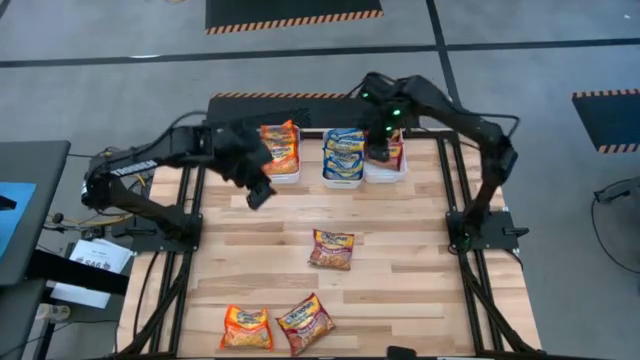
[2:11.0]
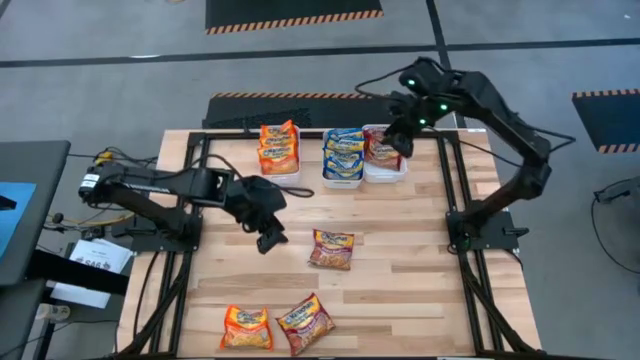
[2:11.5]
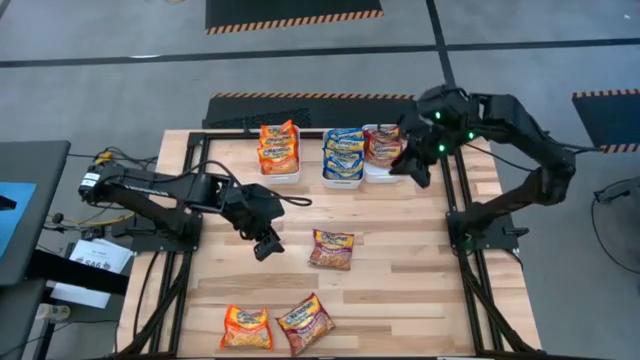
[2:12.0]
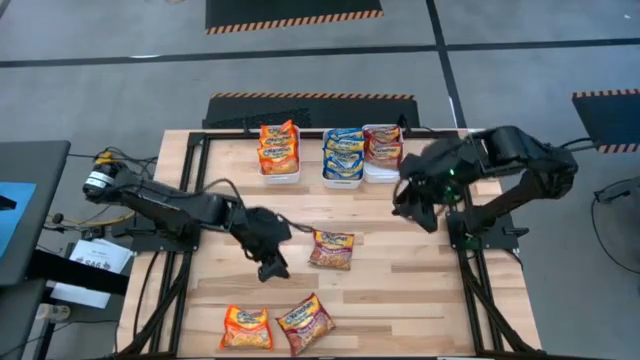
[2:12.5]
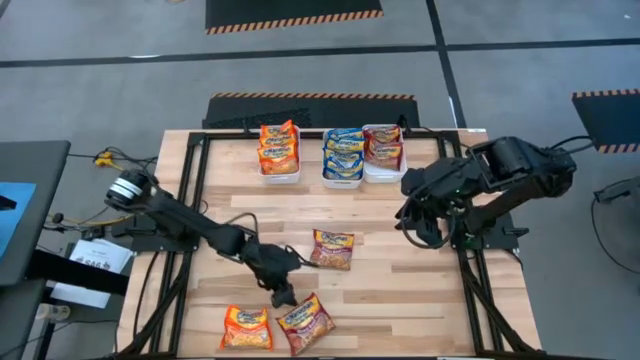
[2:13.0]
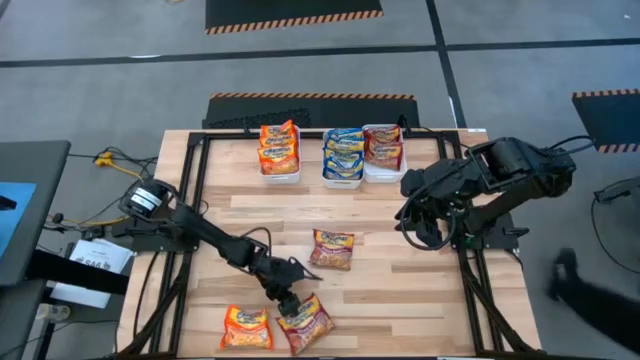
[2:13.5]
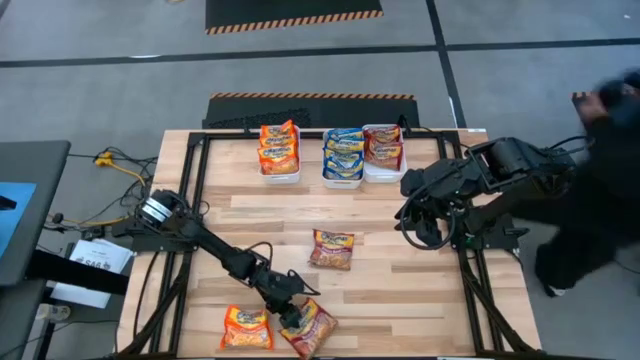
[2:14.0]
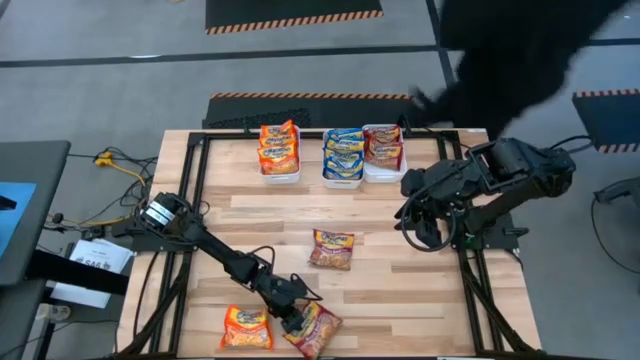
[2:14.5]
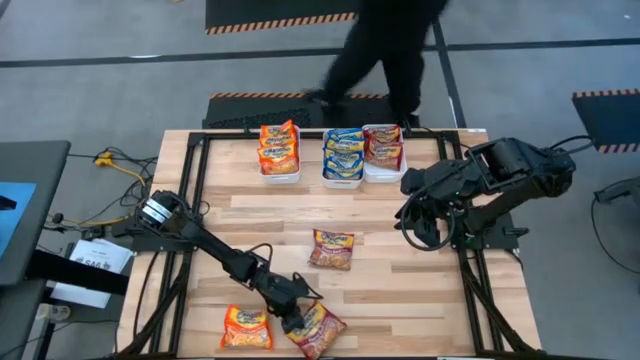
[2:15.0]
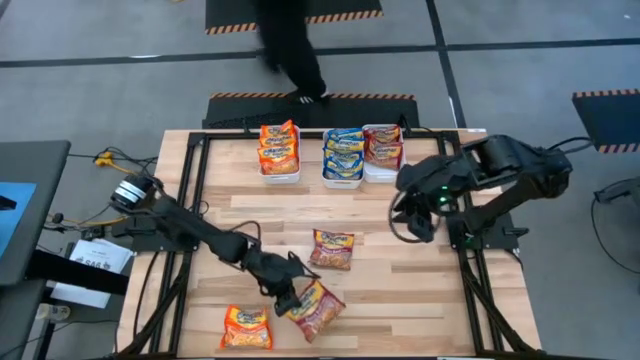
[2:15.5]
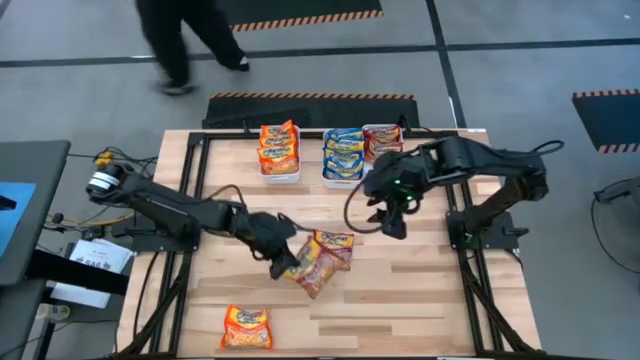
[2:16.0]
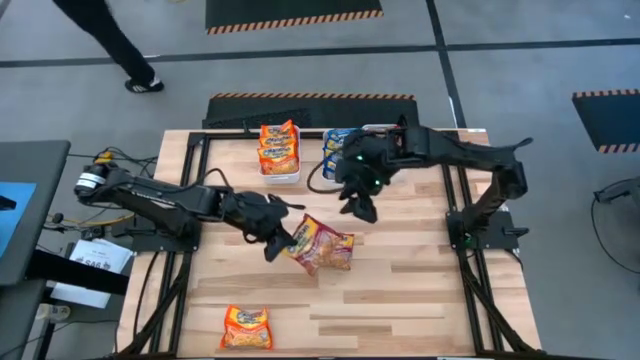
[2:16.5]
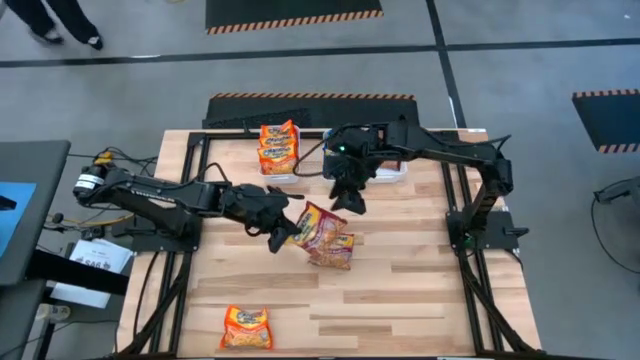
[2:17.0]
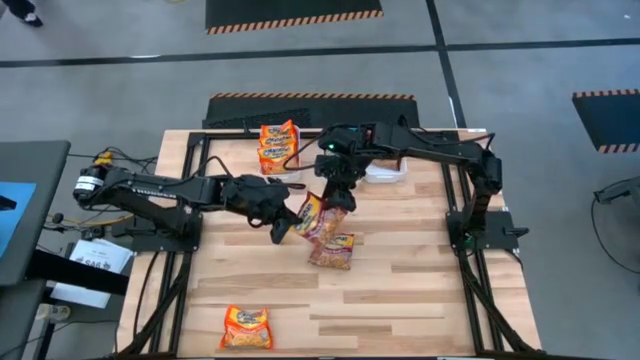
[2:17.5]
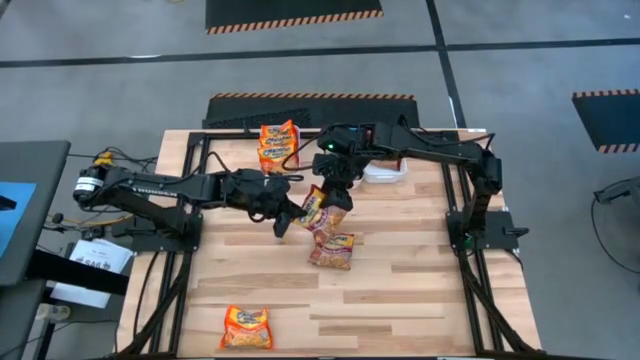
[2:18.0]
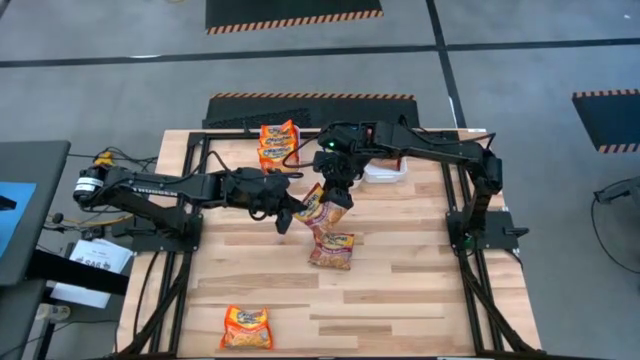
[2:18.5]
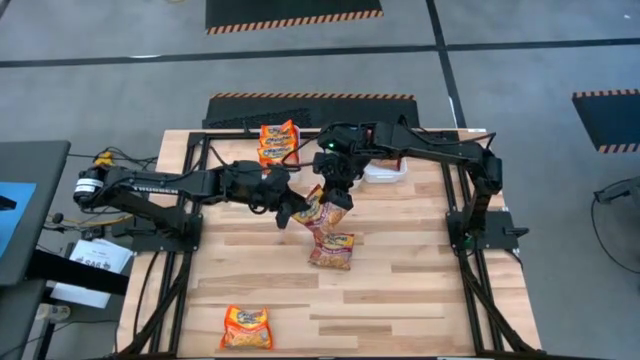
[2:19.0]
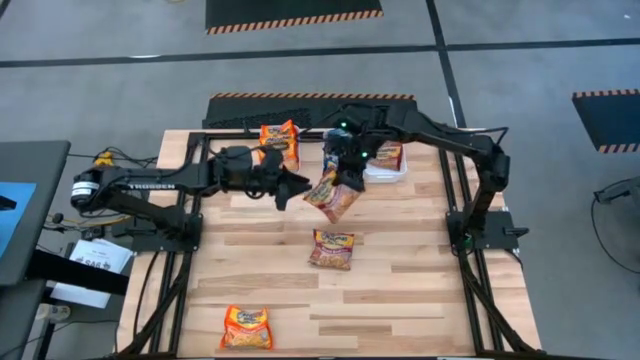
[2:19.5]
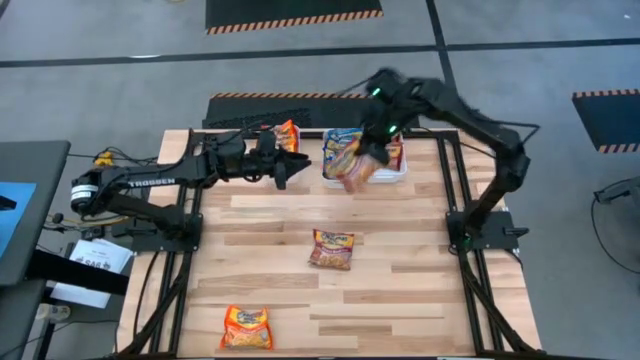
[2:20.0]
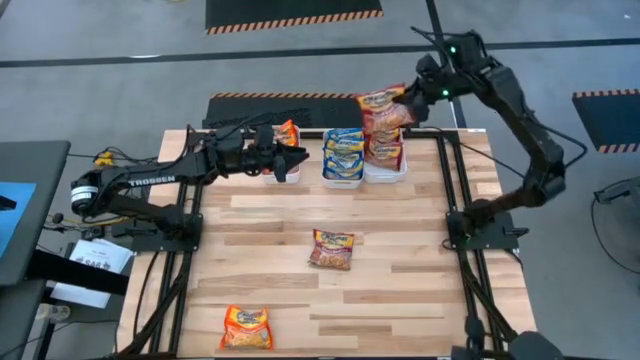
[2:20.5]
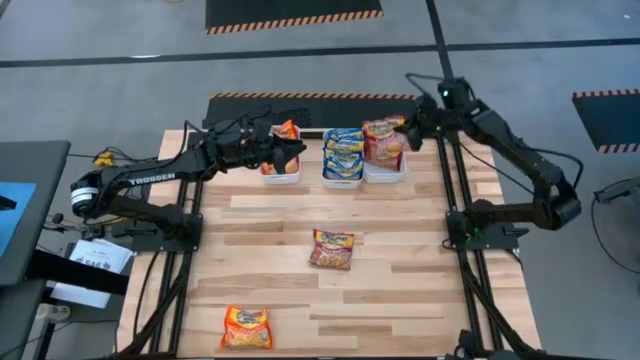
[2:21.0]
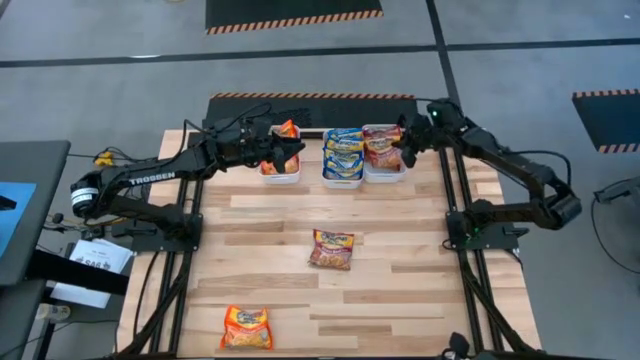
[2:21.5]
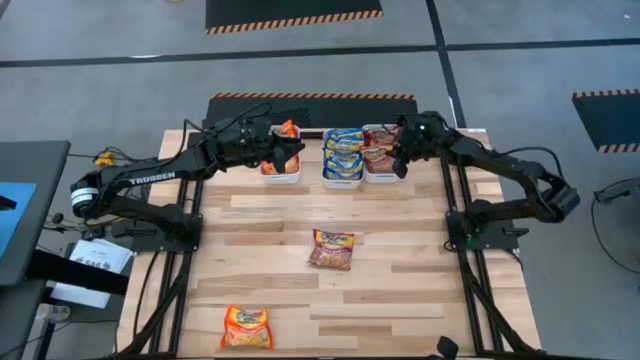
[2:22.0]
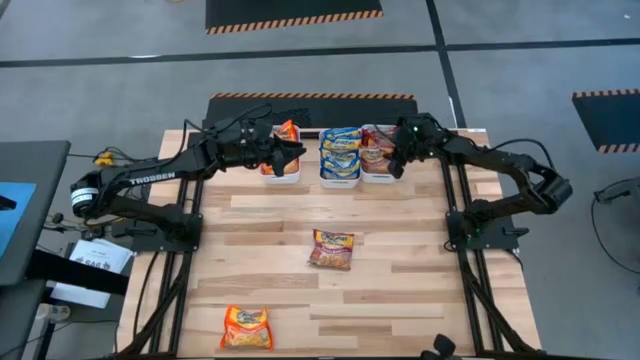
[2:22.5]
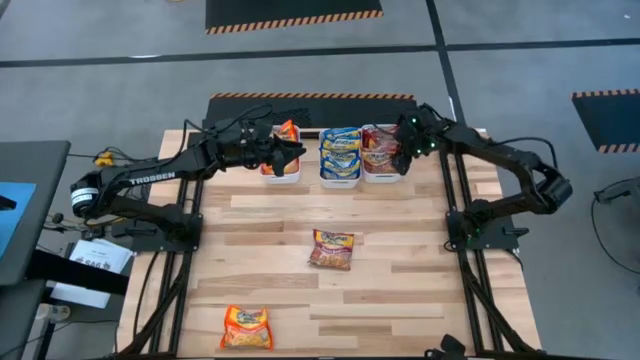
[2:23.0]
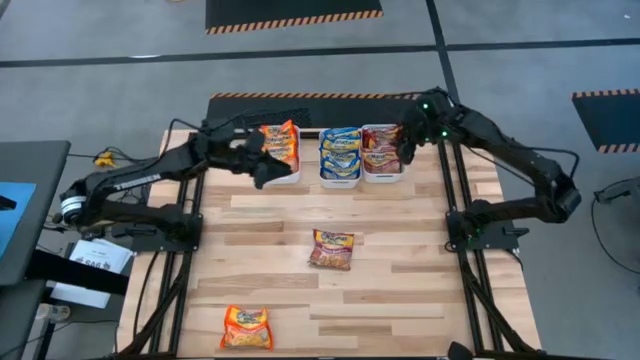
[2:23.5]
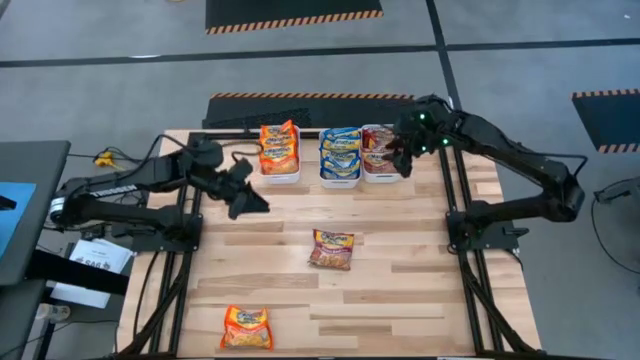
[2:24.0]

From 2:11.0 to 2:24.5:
Task: Sort Maruchan noodles
Put the bottom red noodle soup pack into the right white bin

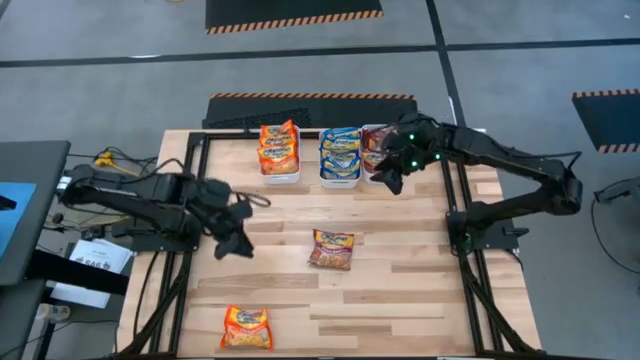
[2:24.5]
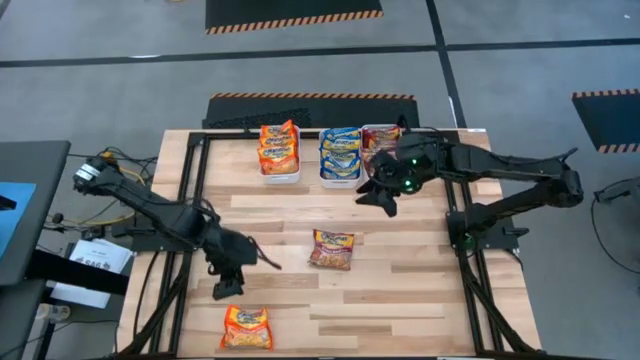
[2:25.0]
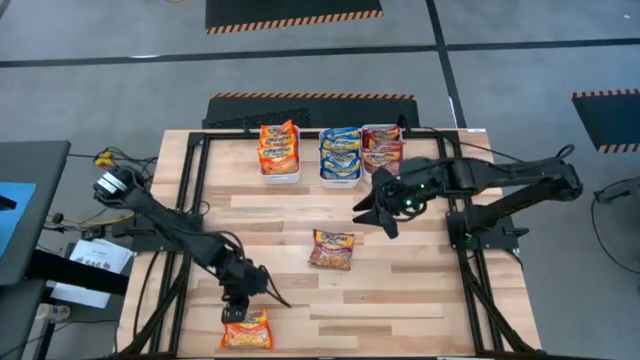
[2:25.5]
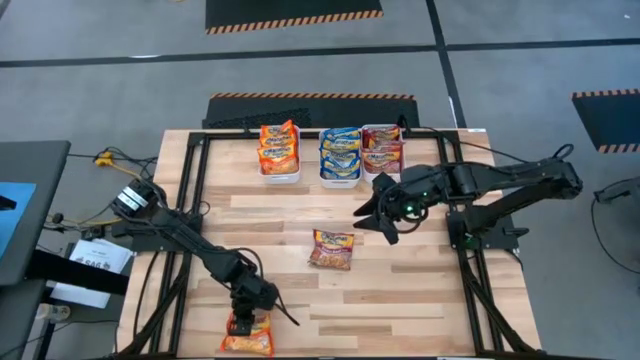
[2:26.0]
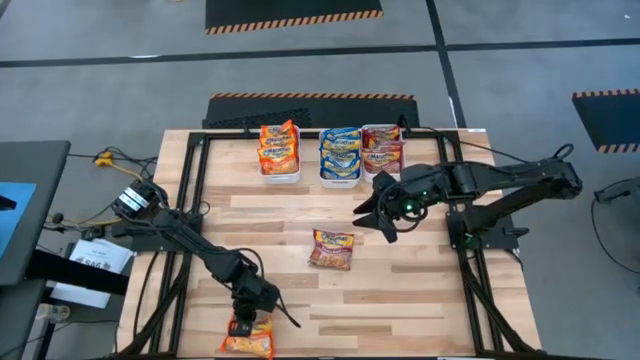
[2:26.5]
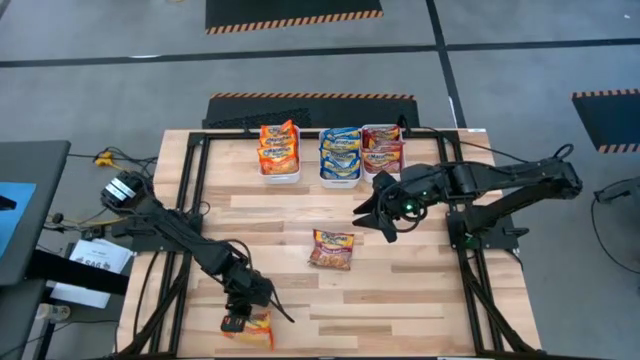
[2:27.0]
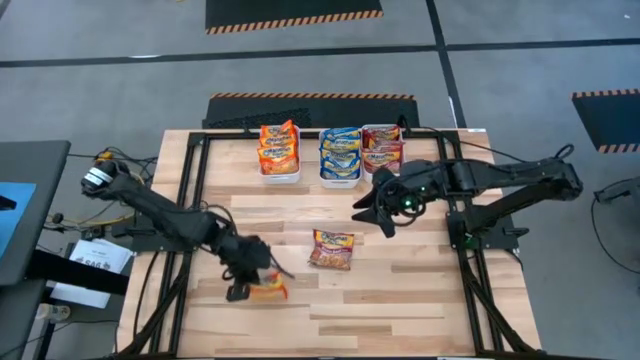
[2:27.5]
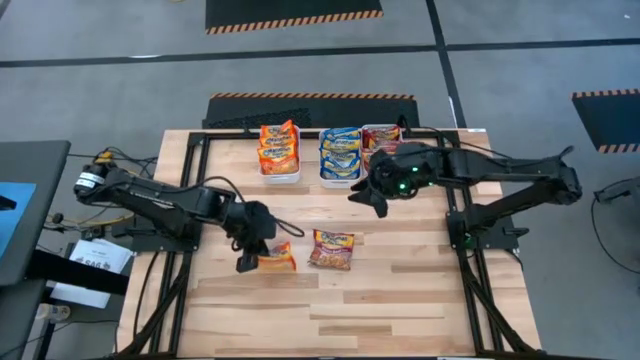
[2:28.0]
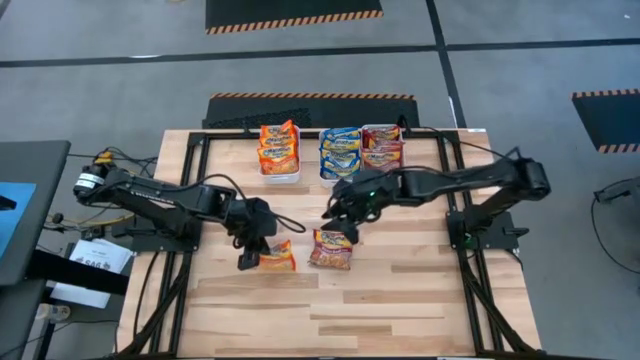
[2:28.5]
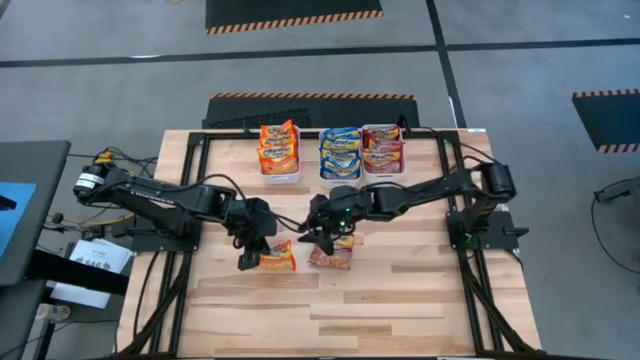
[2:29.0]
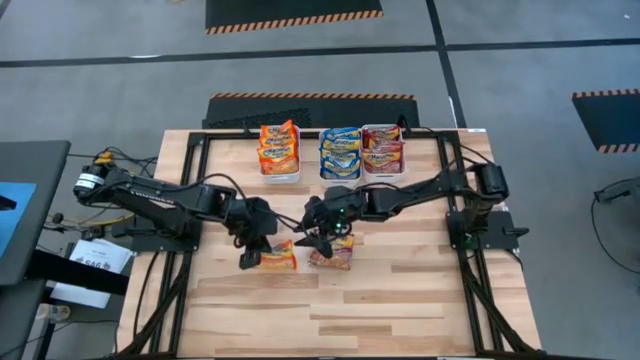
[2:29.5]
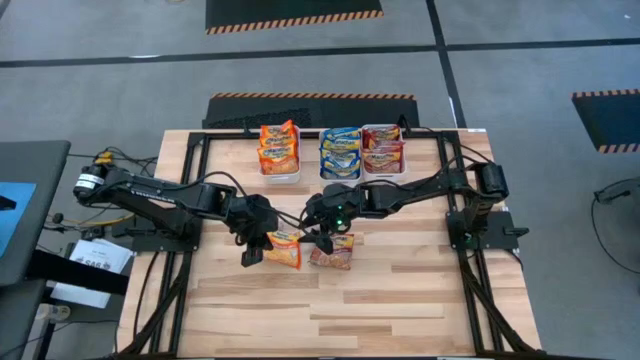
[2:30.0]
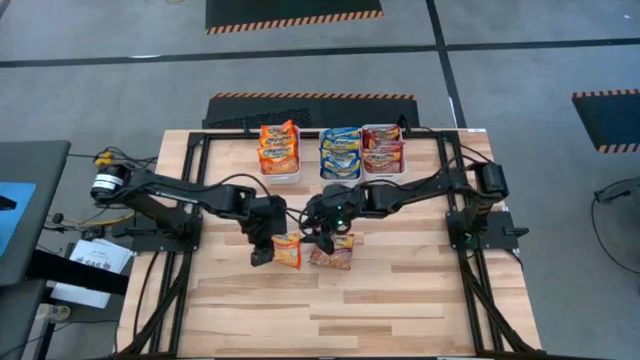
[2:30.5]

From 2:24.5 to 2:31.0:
Put the orange noodle soup pack into the left white bin
